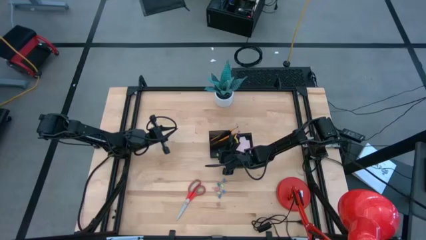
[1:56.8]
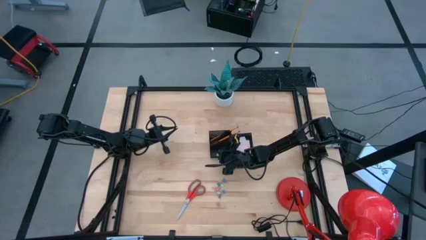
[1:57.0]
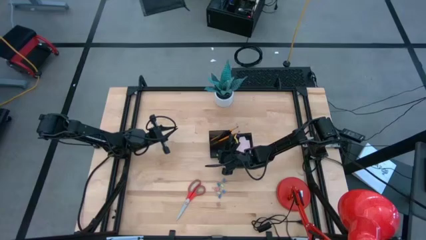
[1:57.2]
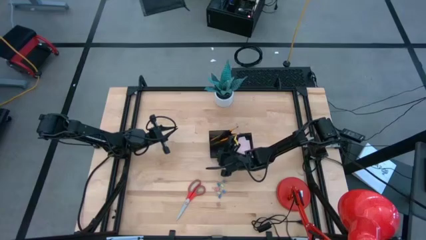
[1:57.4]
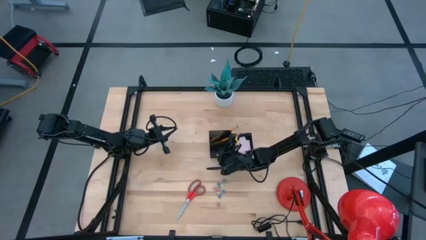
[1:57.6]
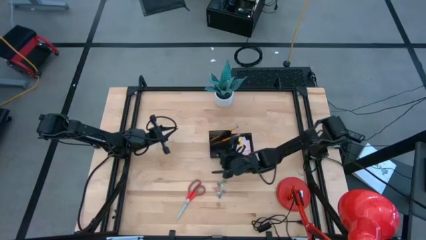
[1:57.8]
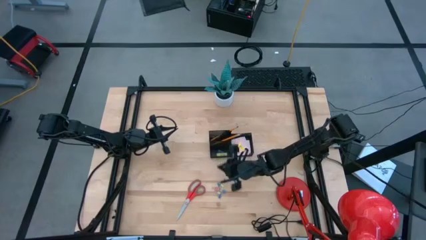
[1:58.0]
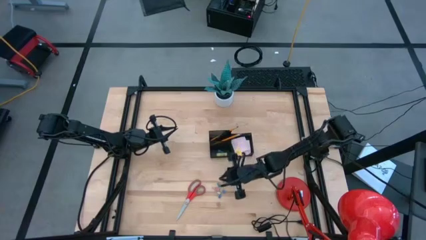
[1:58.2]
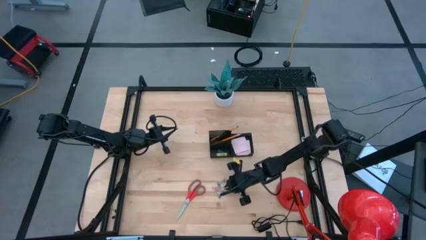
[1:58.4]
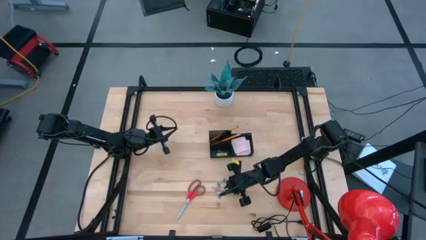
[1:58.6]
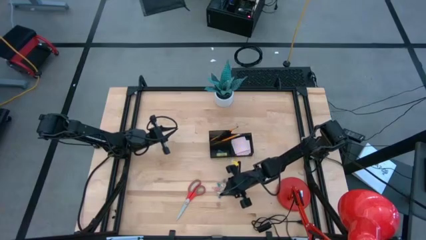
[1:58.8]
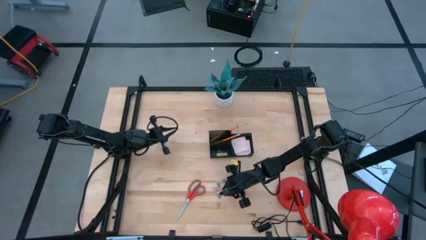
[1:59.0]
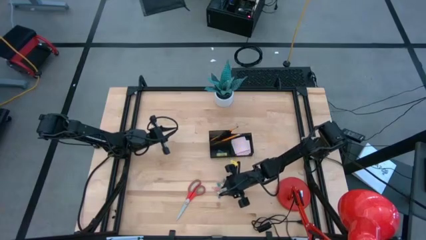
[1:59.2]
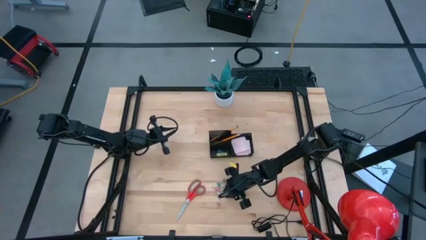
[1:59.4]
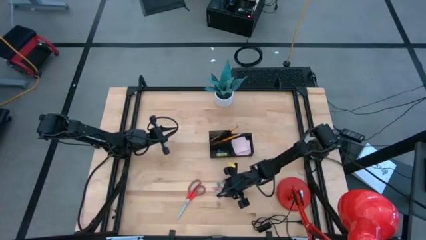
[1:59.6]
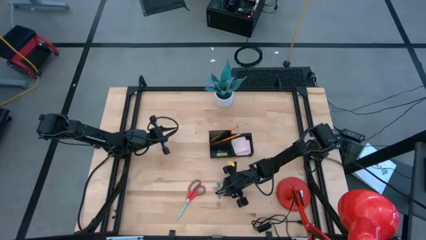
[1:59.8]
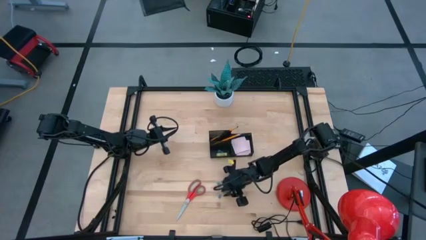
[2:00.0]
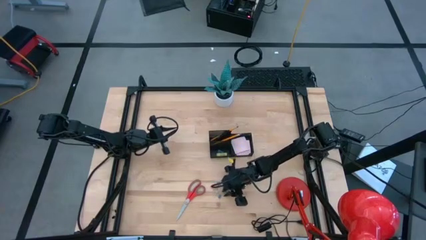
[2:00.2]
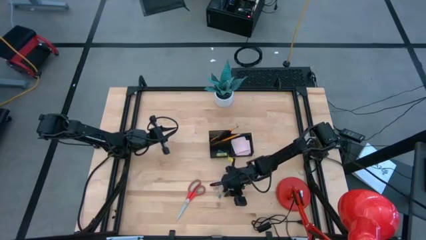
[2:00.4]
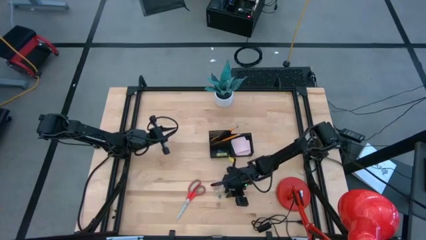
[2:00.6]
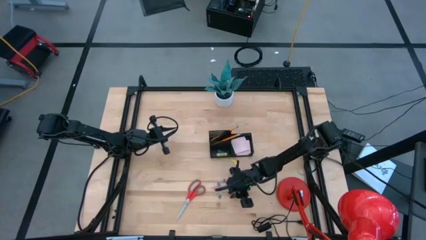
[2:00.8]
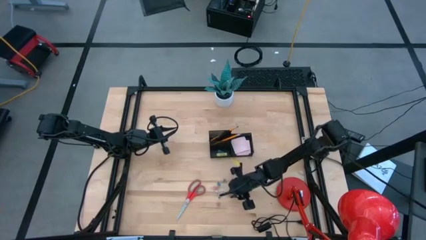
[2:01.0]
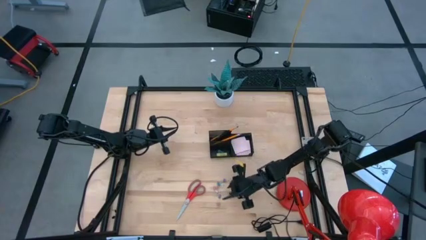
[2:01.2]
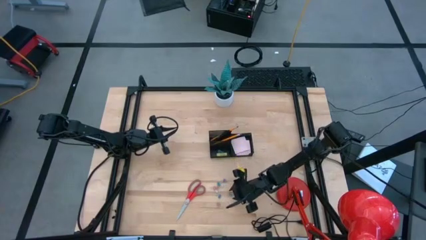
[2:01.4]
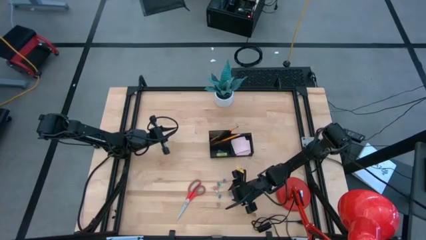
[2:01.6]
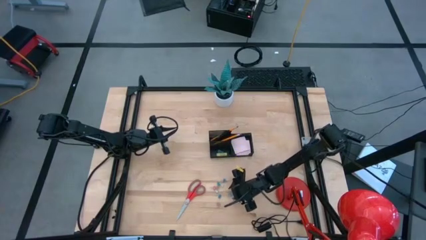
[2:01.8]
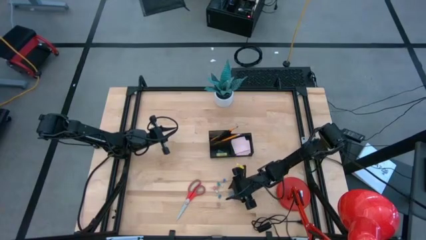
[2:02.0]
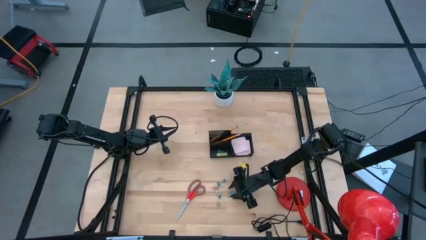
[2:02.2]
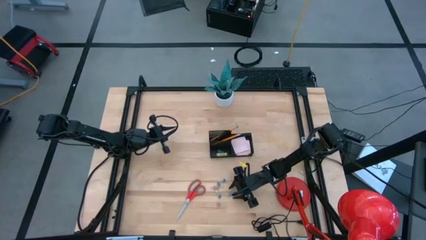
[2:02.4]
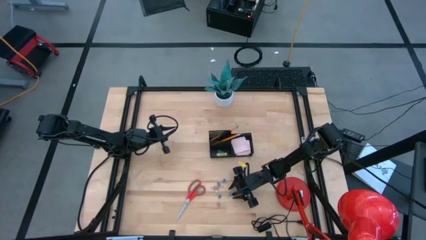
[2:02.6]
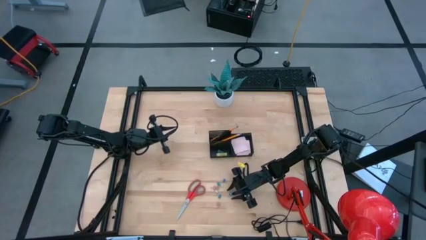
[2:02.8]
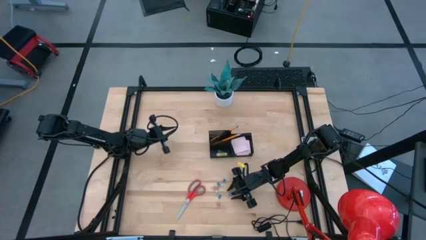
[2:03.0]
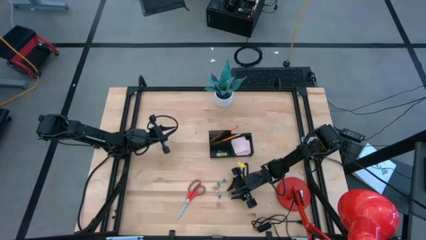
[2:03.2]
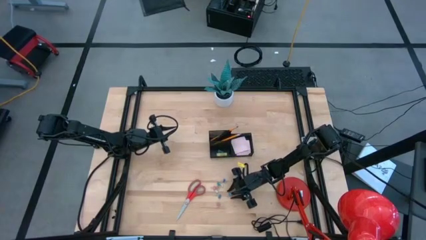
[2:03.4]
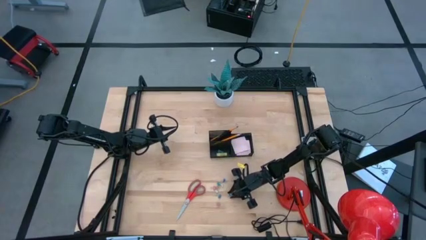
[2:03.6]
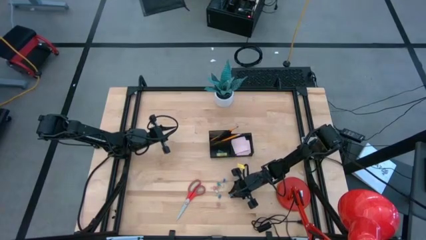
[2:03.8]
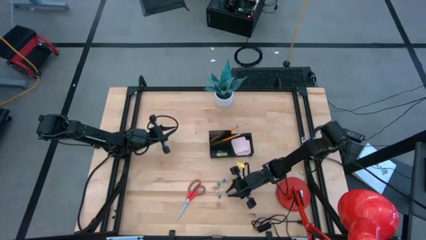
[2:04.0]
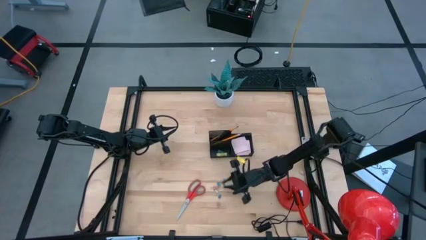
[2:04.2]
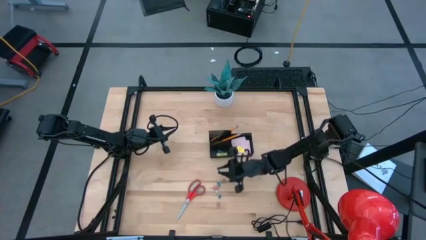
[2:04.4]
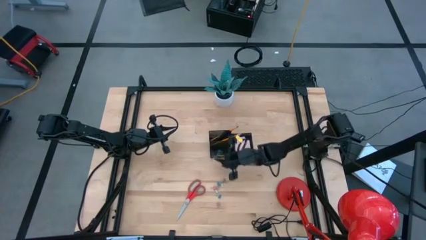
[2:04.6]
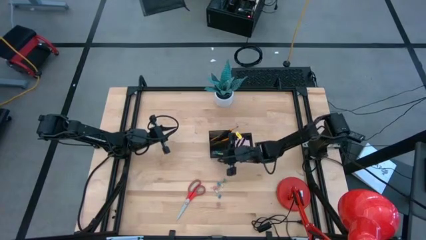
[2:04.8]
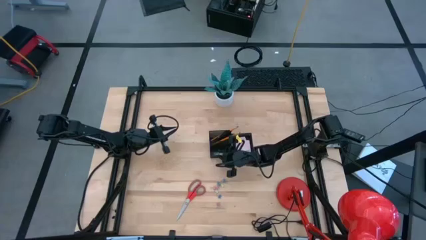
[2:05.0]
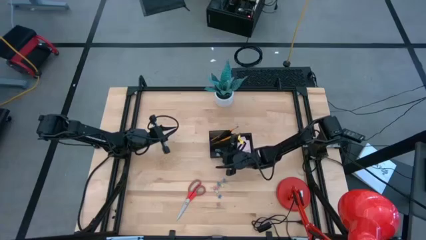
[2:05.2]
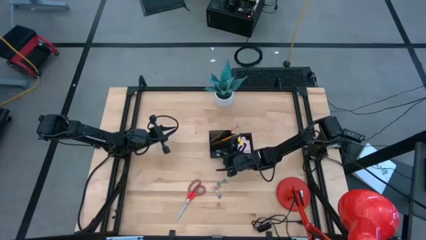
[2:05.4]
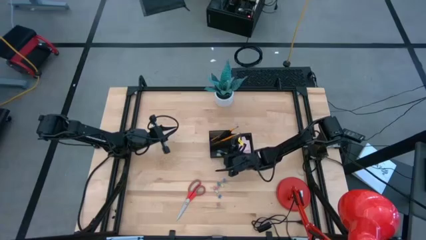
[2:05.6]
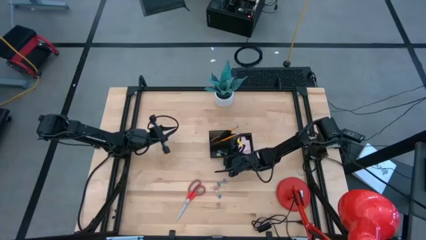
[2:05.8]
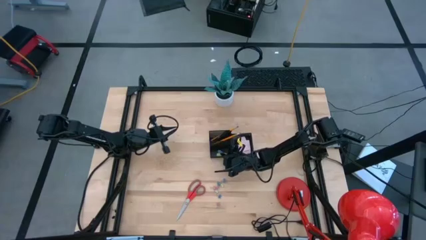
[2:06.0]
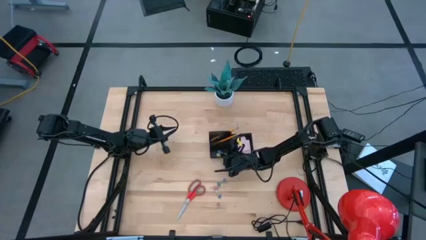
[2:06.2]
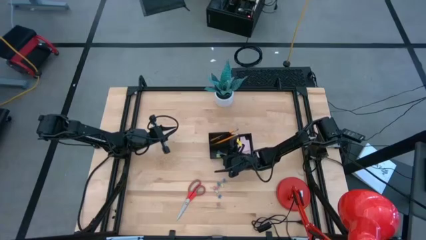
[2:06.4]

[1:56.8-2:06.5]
Task: Pick and place office supplies into organizer
Put the blue binder clip into the desk organizer

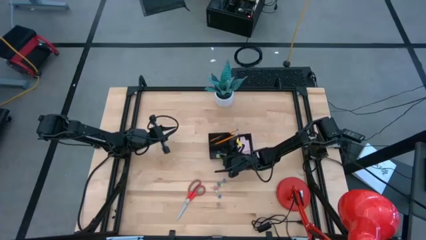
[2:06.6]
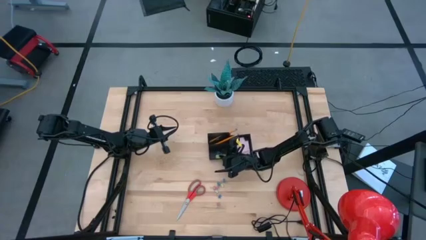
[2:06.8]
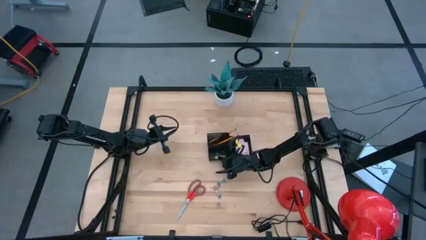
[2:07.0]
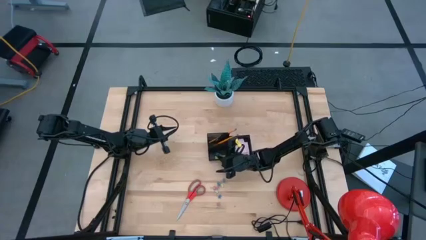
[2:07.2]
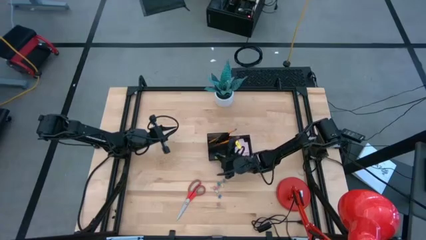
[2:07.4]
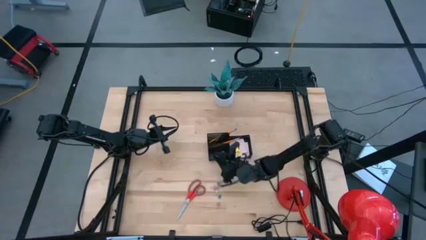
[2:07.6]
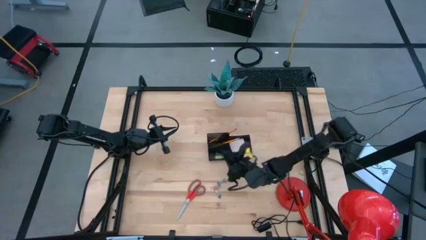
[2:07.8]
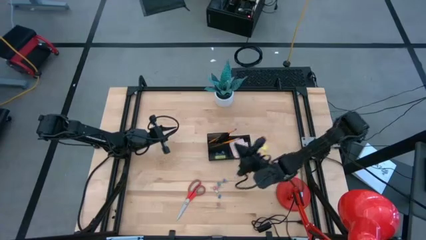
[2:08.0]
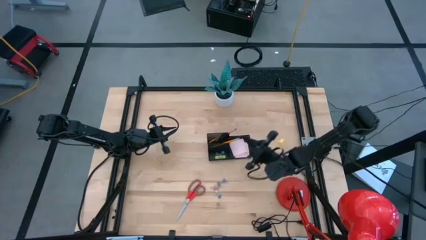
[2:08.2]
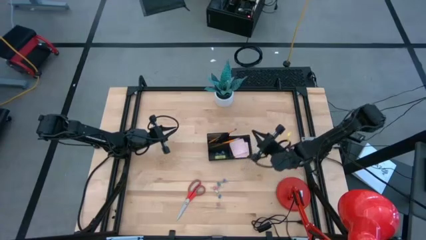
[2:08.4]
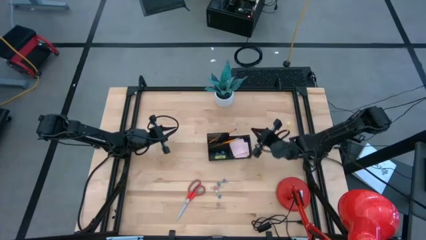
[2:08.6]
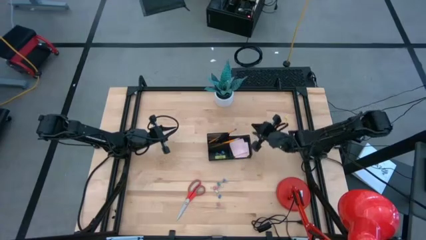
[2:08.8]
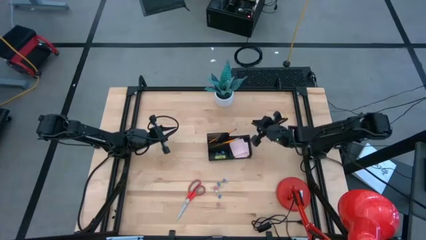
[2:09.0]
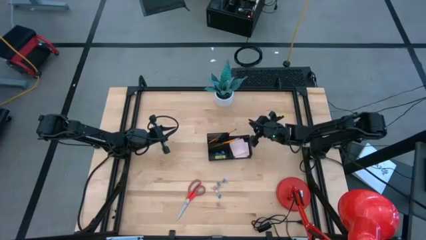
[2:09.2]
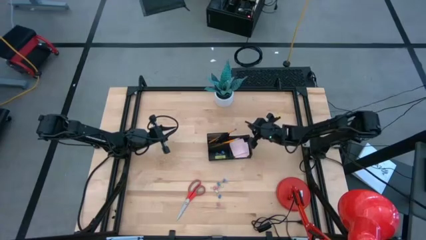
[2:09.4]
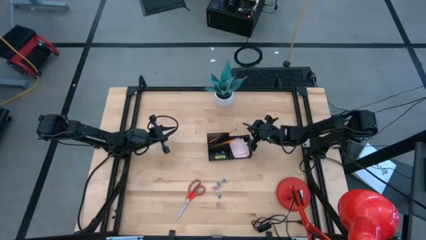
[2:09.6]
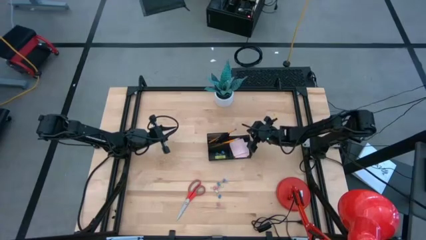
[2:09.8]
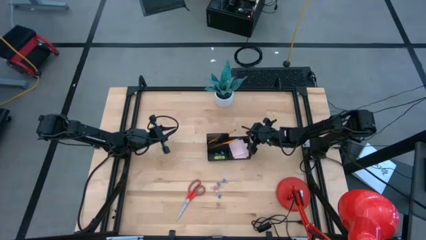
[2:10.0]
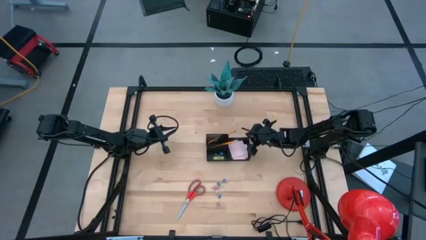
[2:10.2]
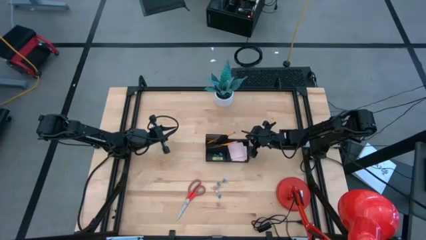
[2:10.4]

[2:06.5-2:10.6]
Adjust the desk organizer

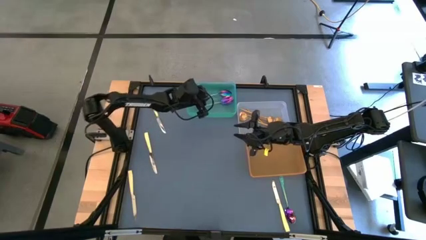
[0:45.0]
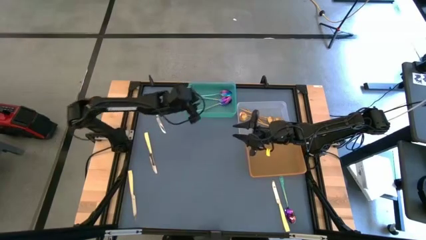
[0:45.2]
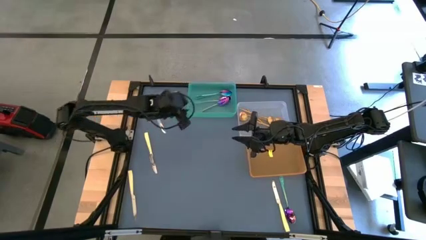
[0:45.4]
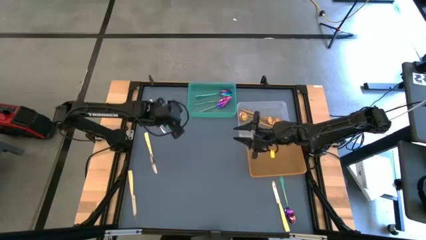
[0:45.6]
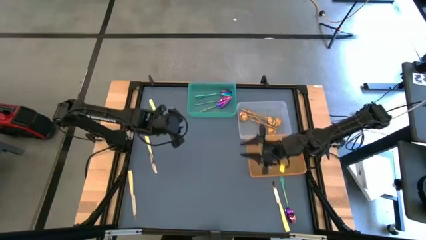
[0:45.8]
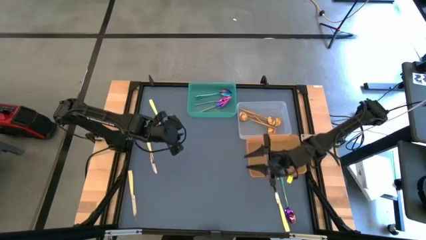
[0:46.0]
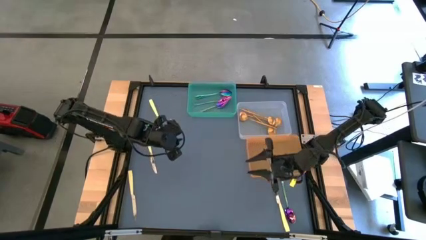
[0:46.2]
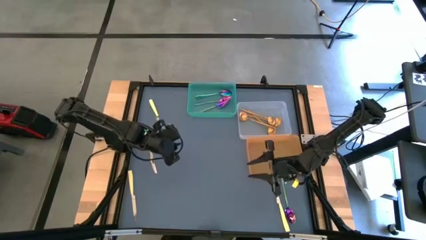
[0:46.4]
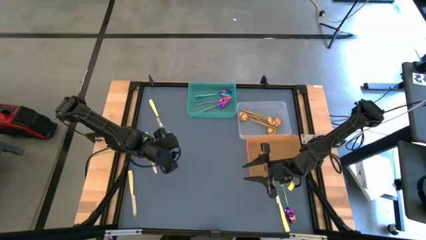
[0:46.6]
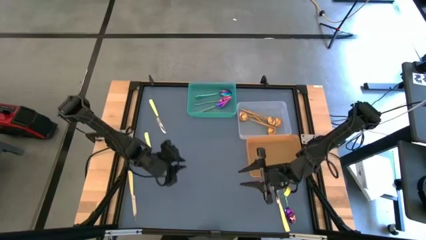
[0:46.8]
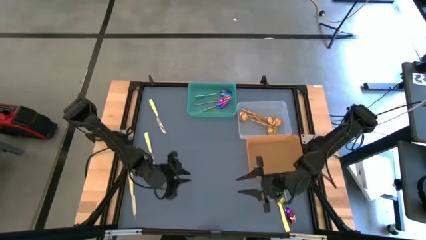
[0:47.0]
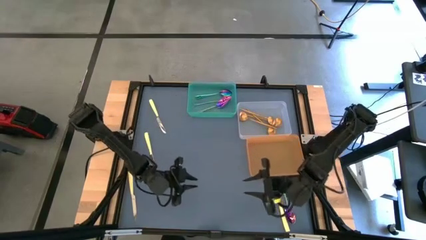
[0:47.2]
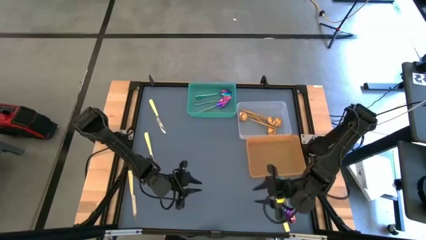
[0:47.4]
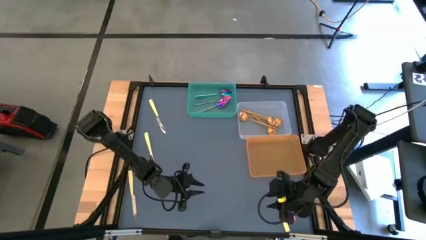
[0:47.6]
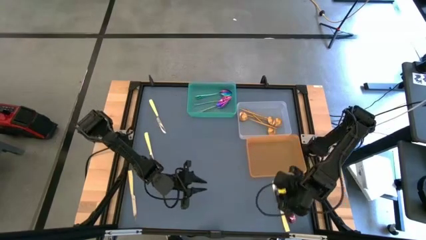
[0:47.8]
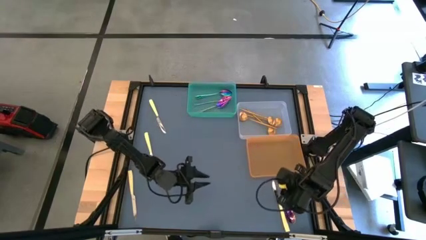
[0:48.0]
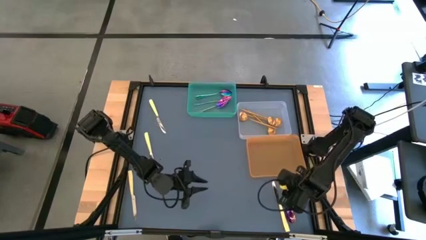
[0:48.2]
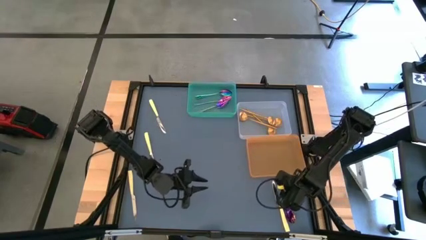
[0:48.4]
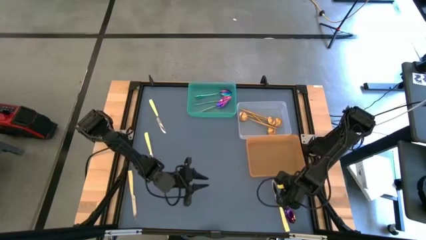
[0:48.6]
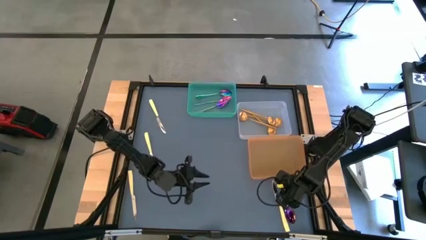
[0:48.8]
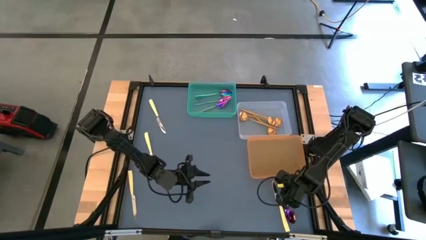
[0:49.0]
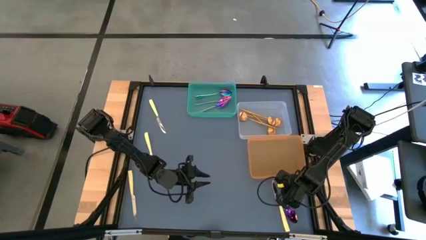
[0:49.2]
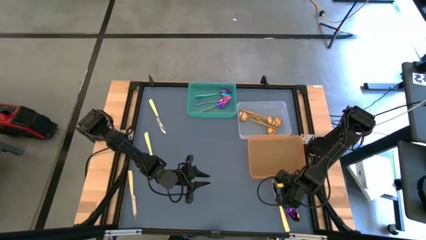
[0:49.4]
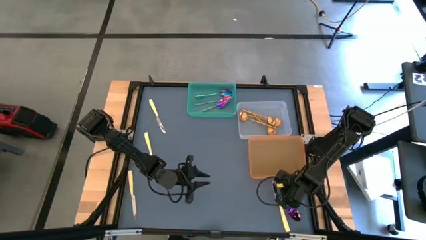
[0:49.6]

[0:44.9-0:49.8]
Task: Sort silverware by color (type)
Put the purple spoon into the green bin
